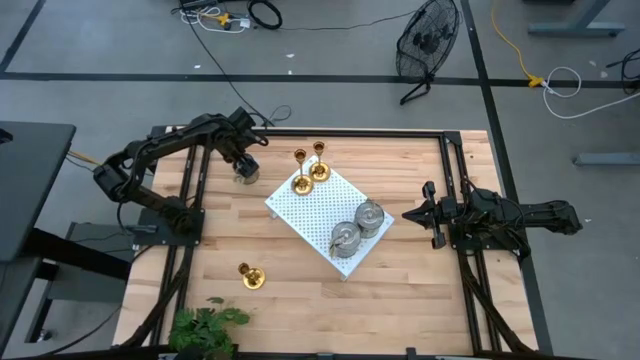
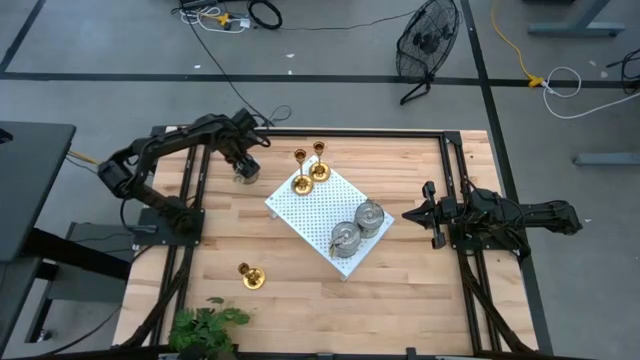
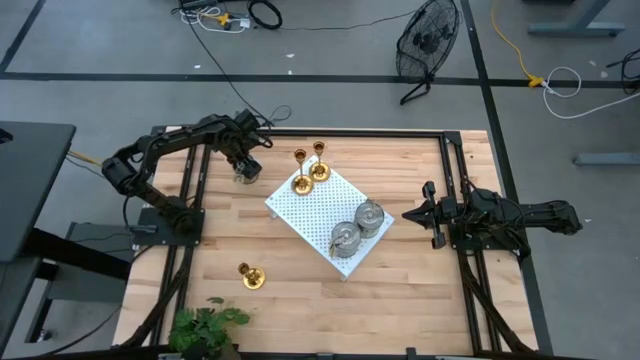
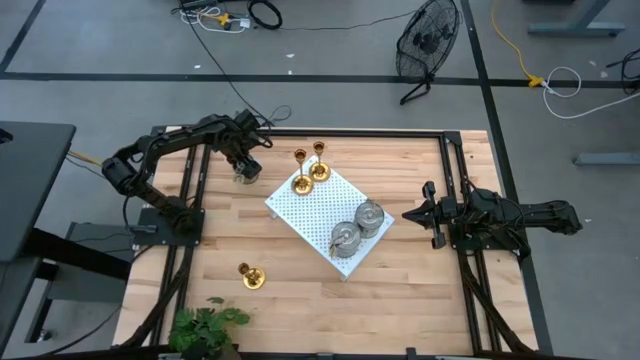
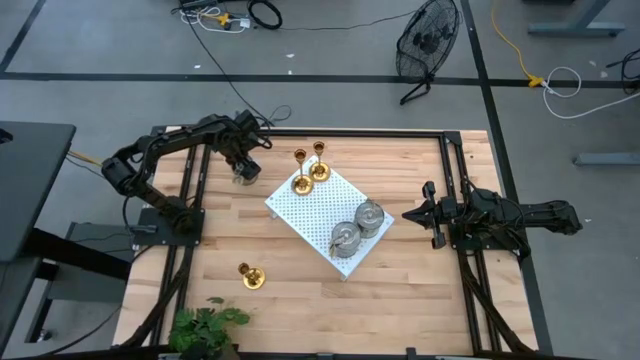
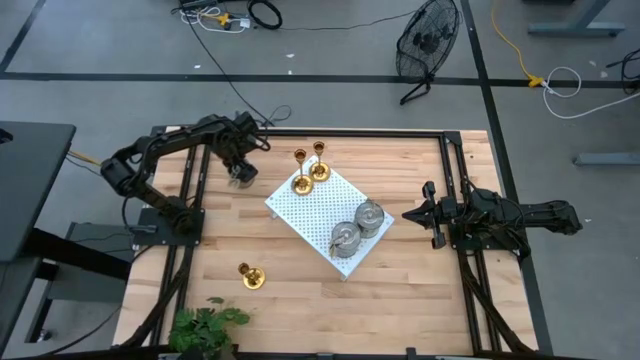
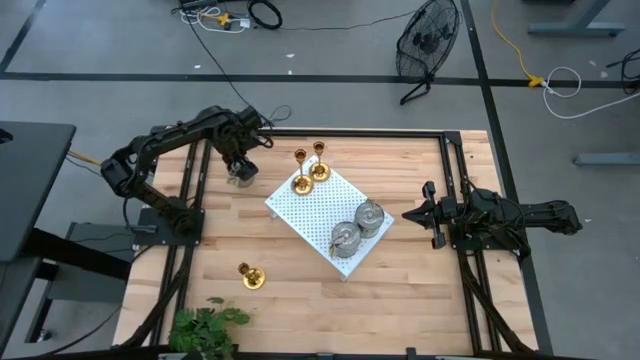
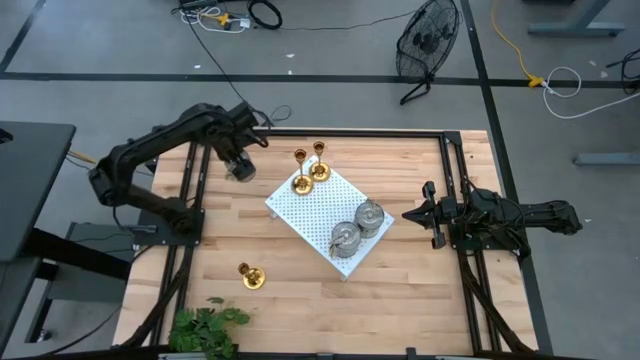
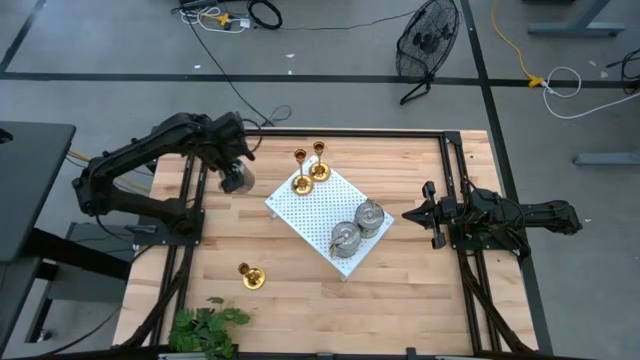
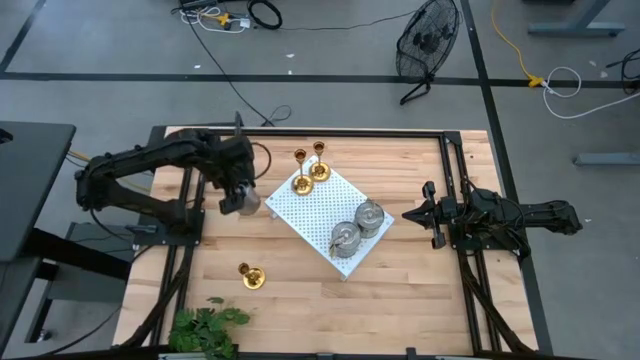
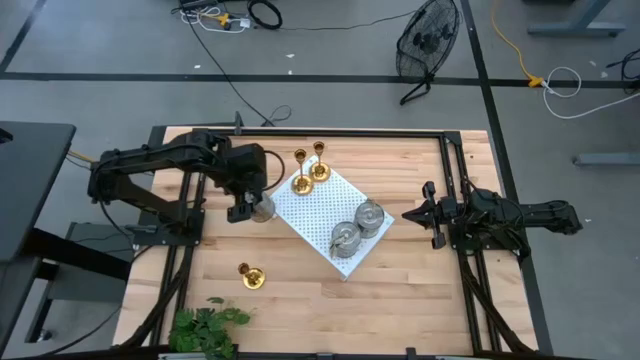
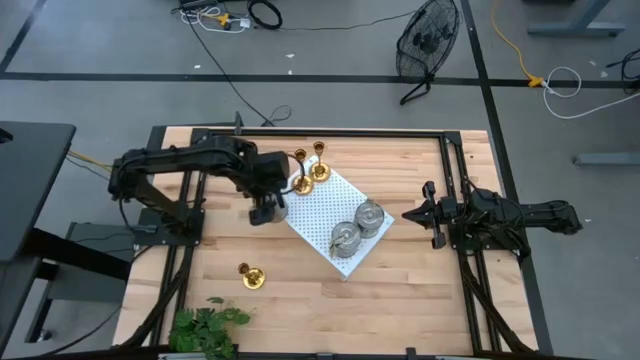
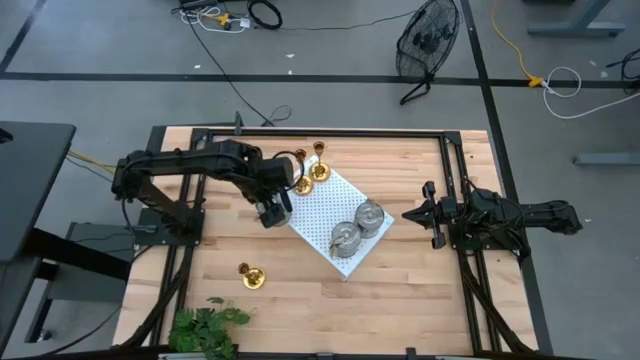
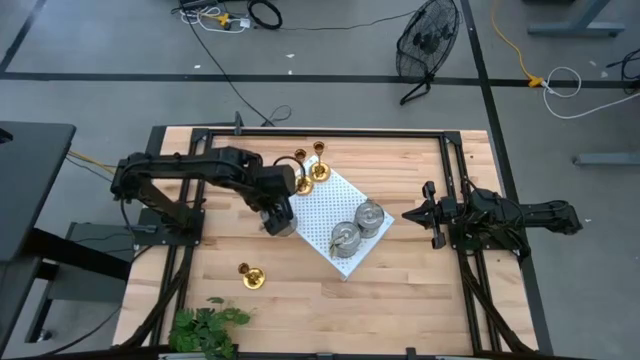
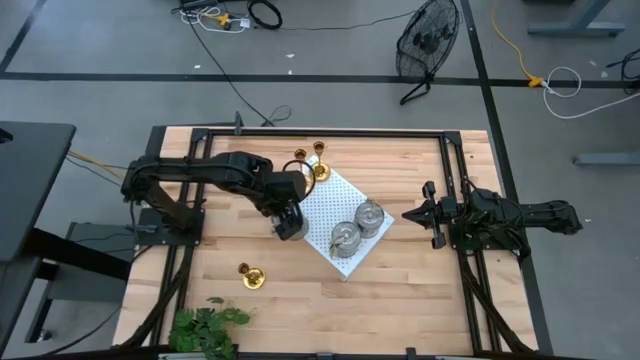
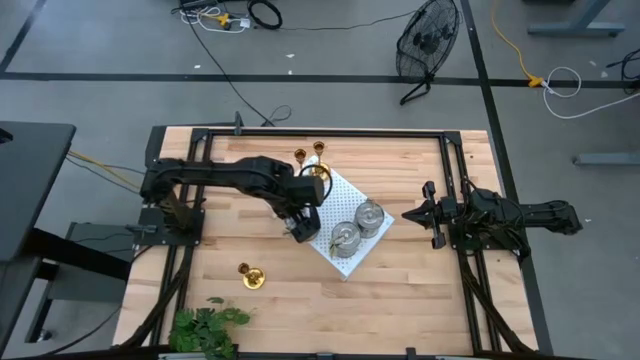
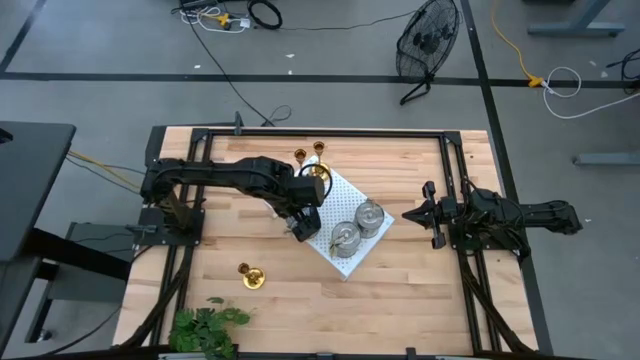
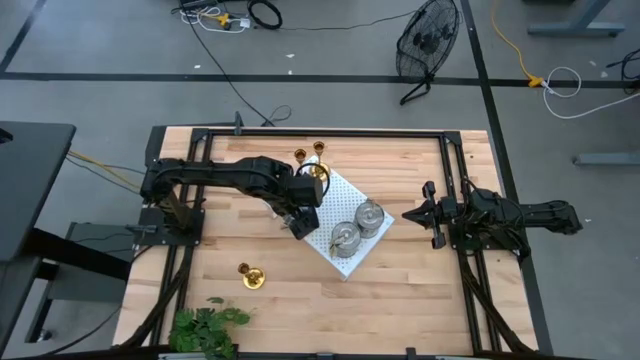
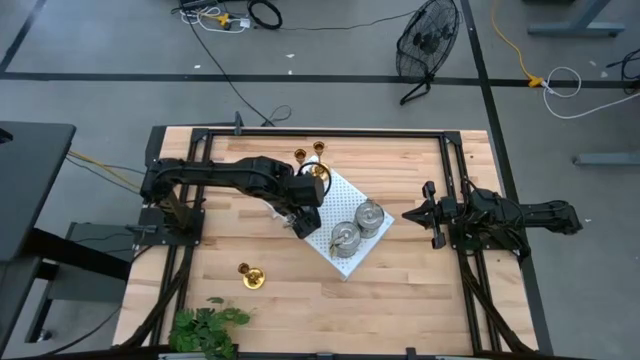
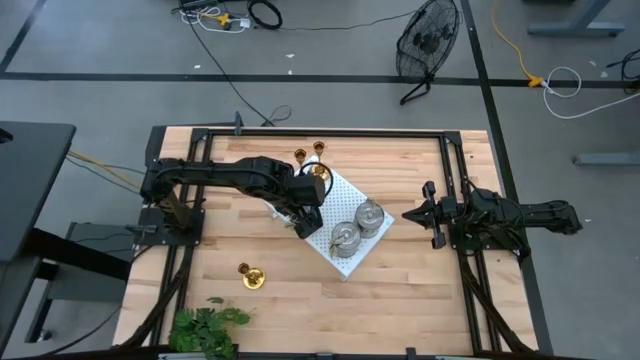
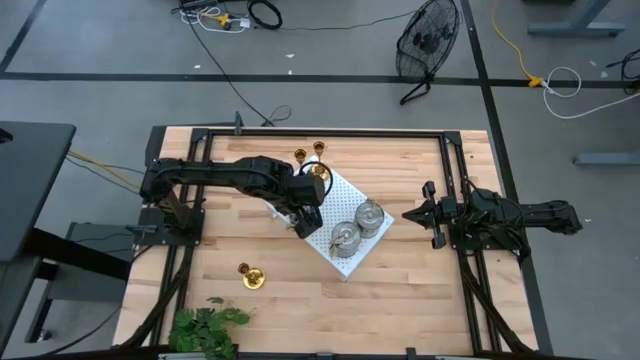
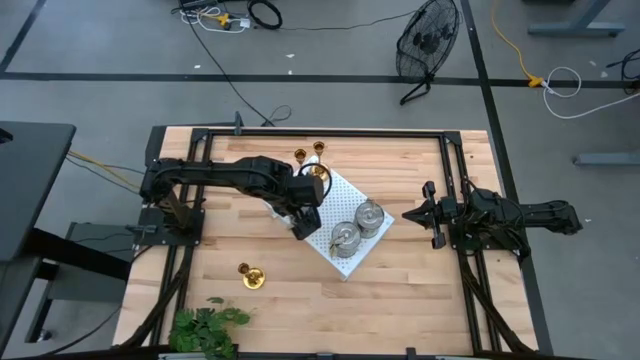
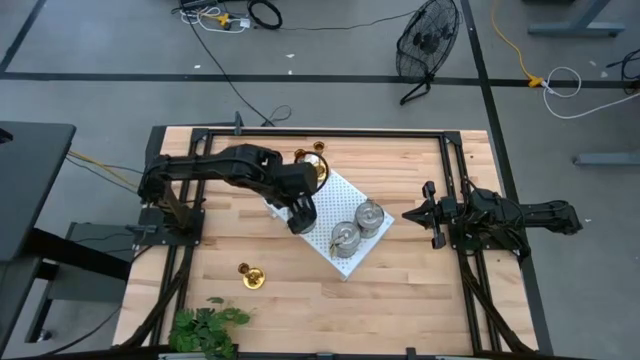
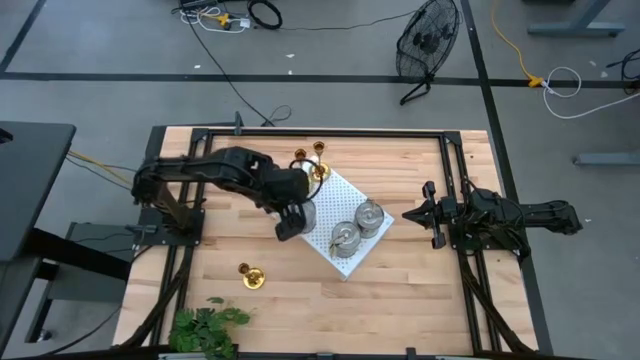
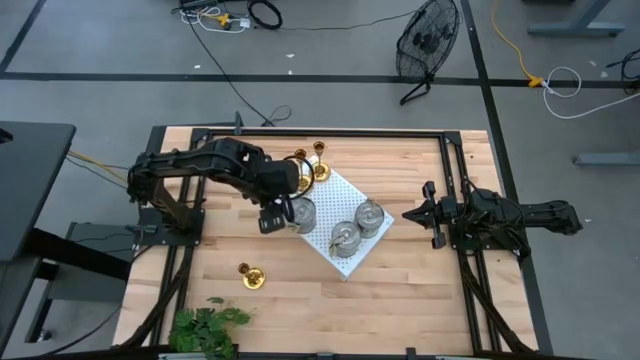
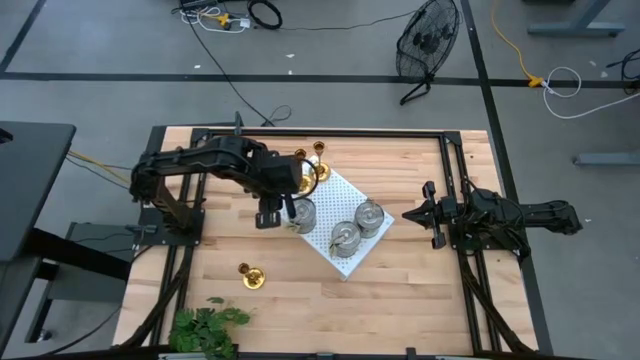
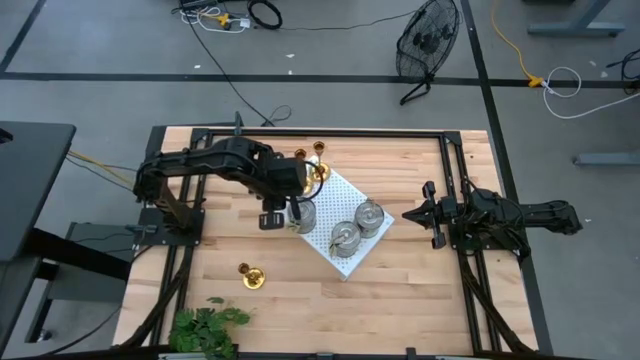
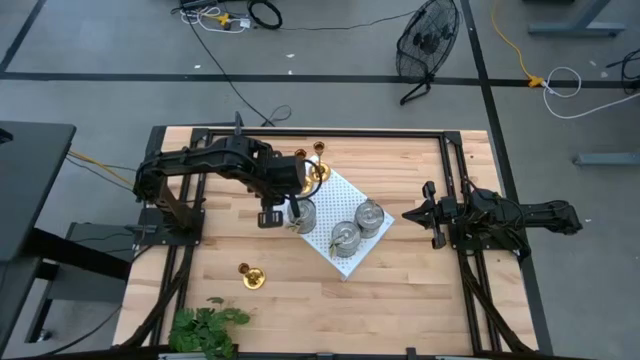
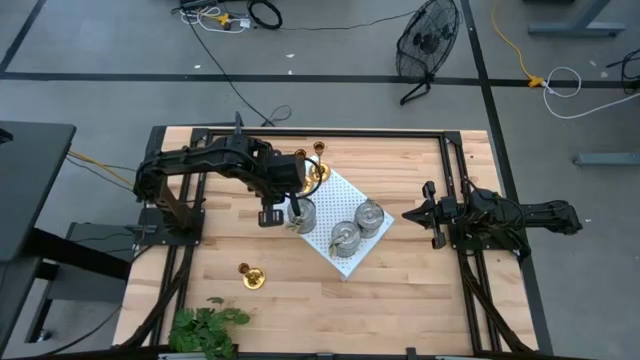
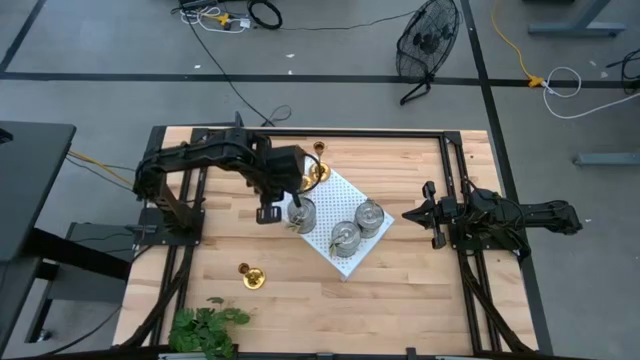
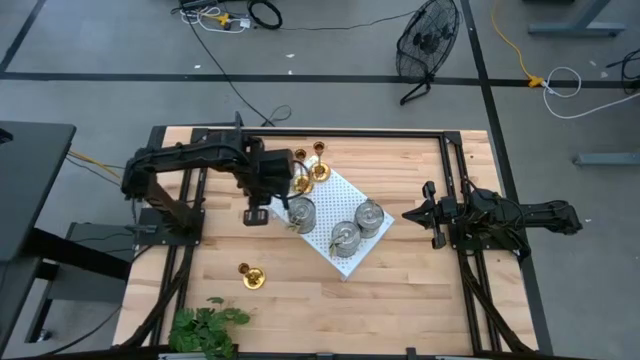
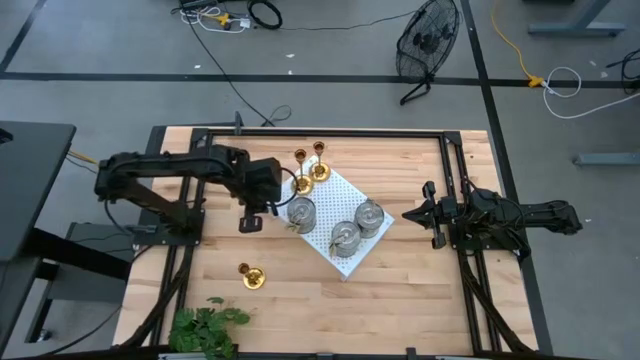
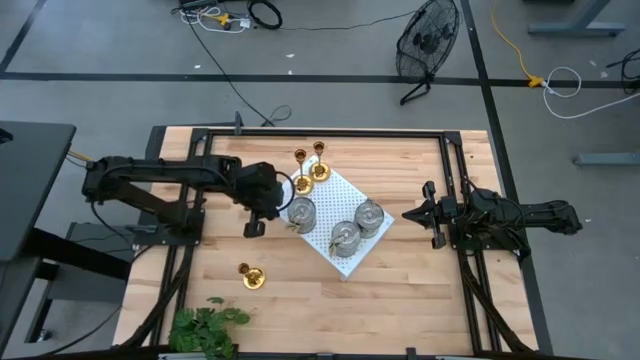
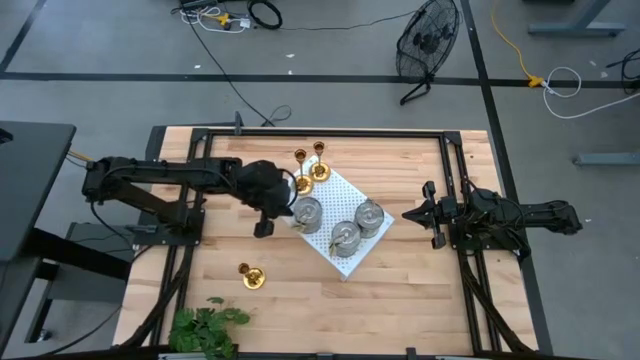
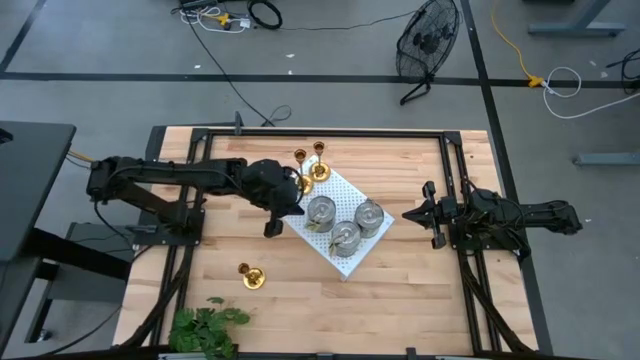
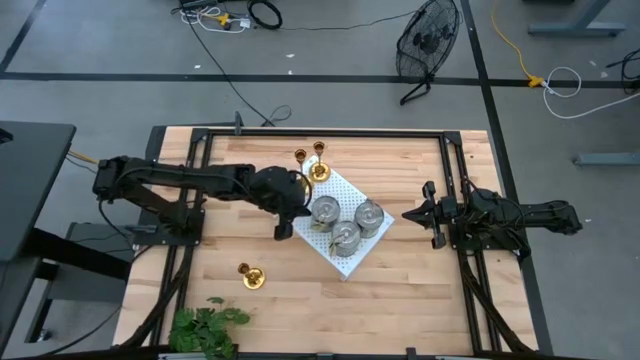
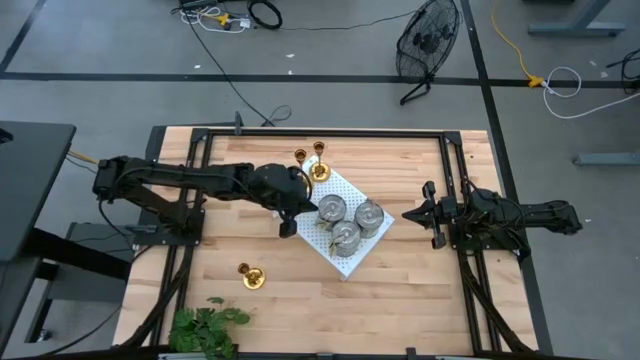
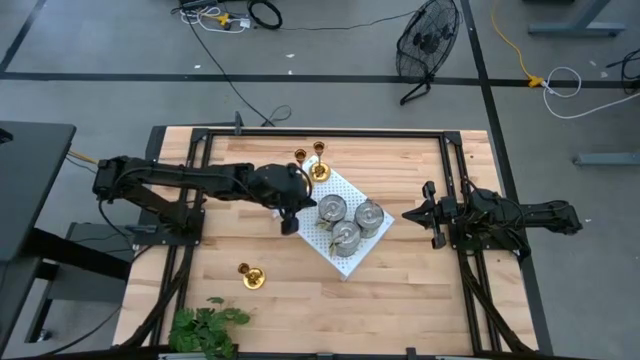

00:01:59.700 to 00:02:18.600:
Task: Pick & Place candle stick holders
Put the scented candle on the shelf

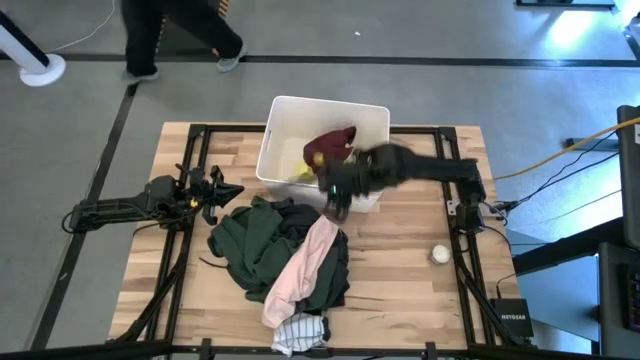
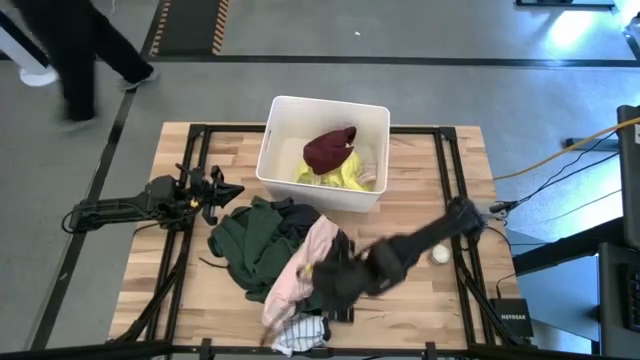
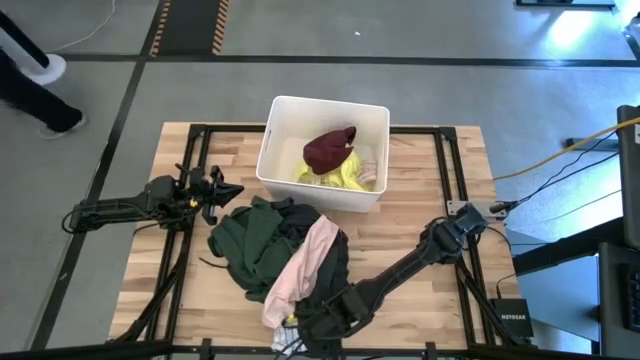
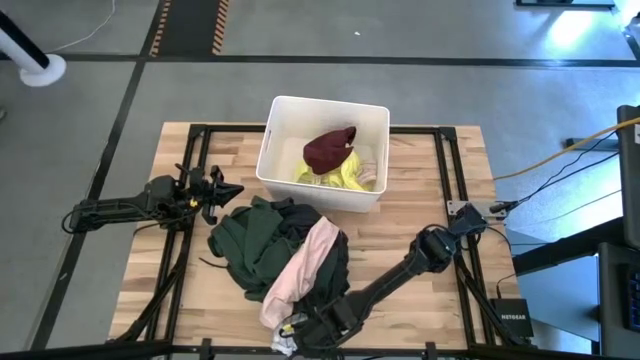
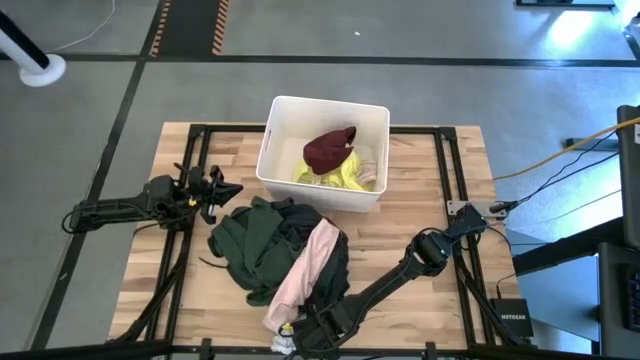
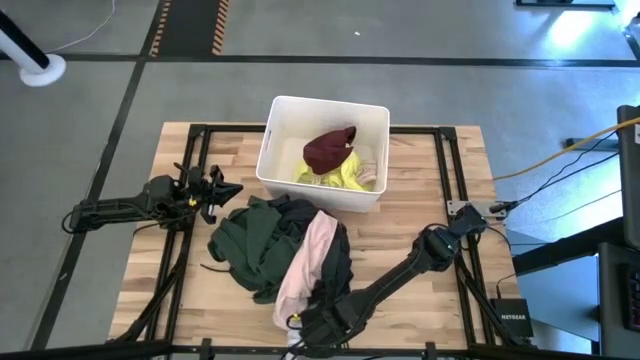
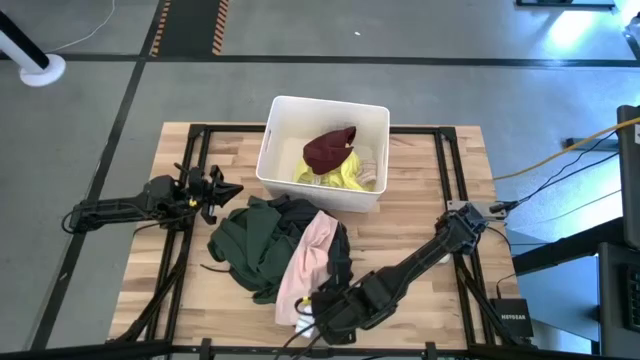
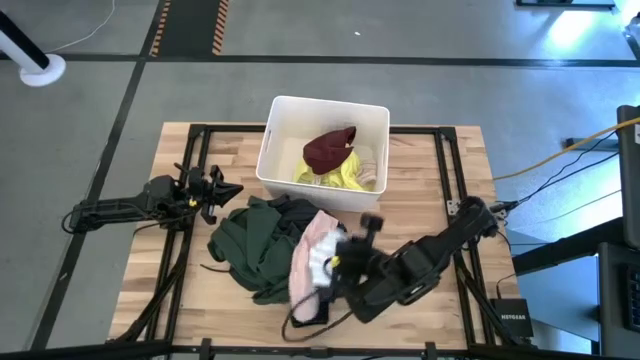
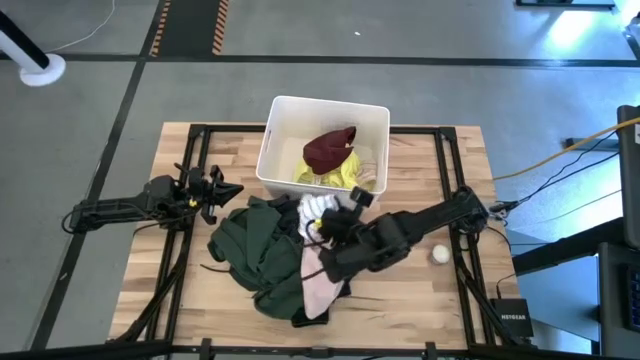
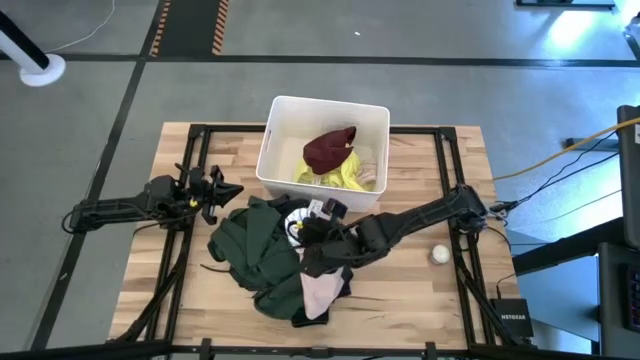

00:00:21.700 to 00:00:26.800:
Task: Sort clothes
Put the top white stripe sock into the white bin
